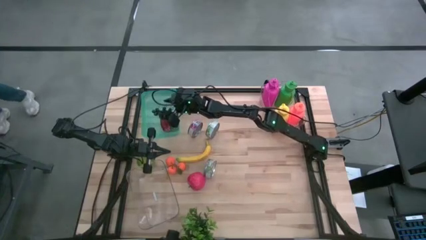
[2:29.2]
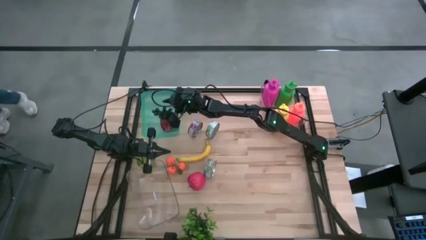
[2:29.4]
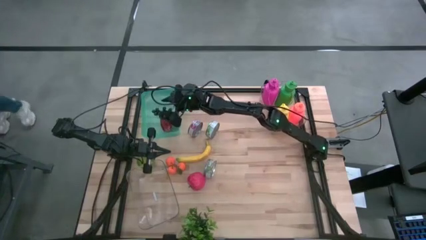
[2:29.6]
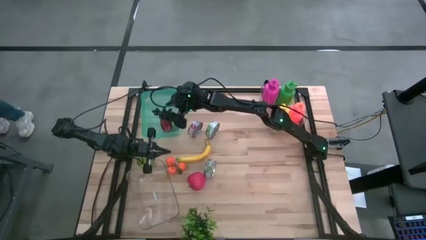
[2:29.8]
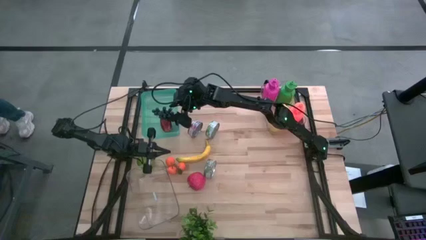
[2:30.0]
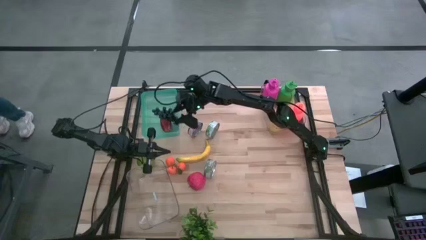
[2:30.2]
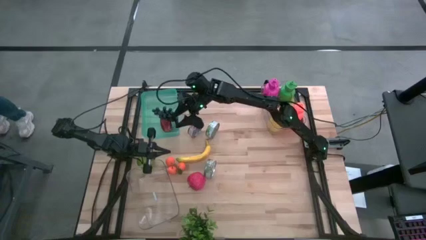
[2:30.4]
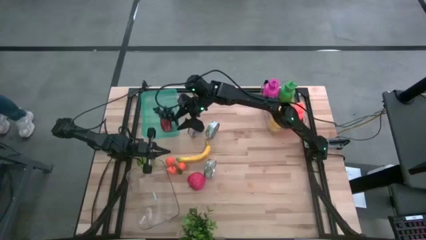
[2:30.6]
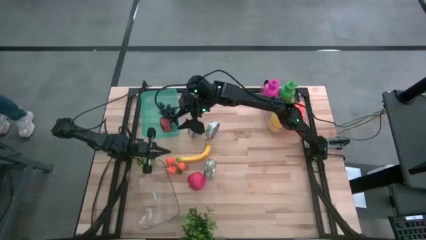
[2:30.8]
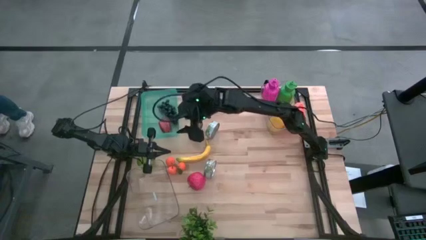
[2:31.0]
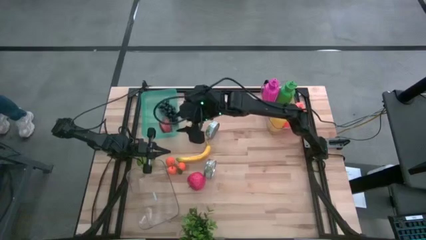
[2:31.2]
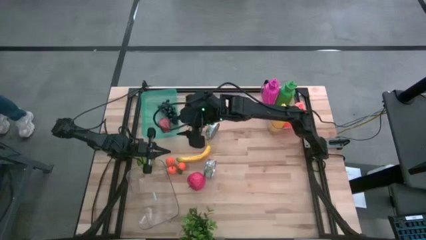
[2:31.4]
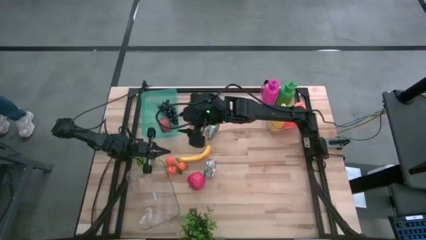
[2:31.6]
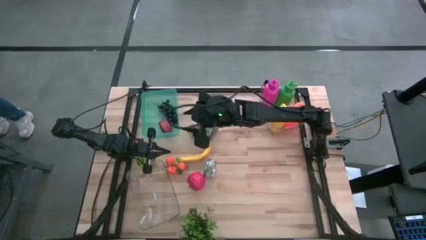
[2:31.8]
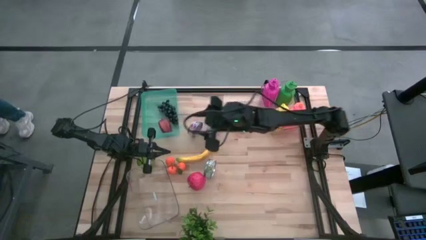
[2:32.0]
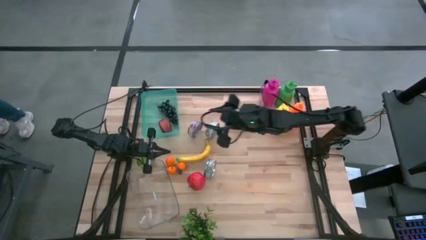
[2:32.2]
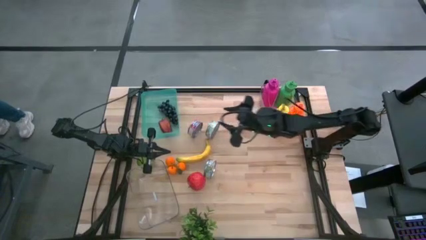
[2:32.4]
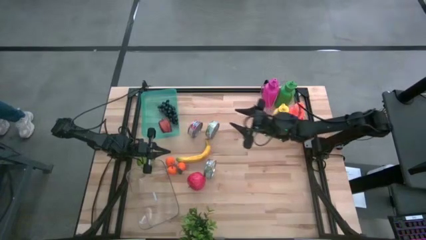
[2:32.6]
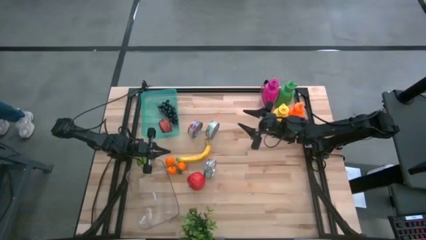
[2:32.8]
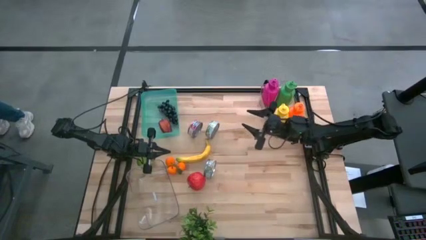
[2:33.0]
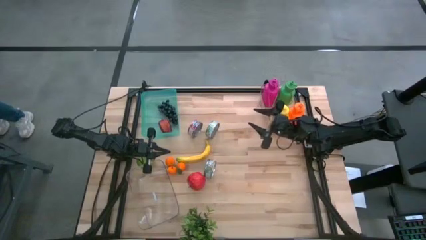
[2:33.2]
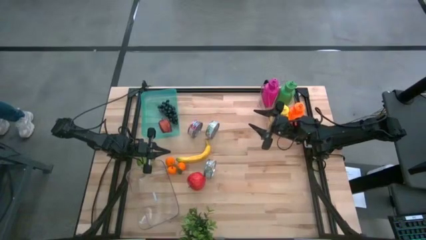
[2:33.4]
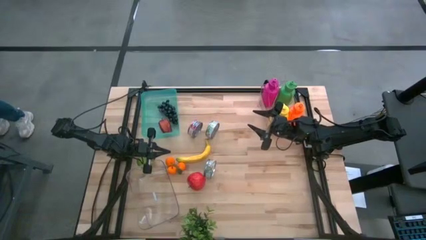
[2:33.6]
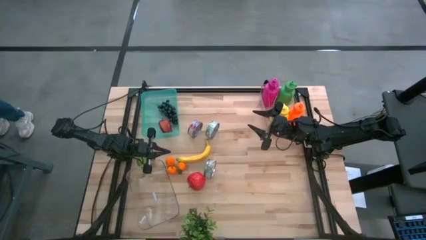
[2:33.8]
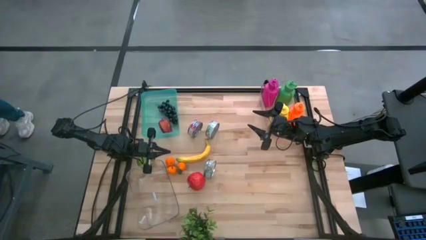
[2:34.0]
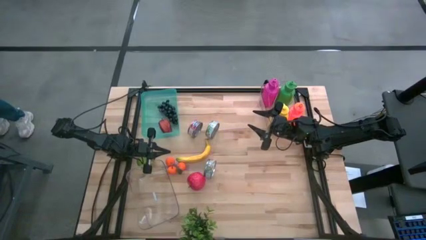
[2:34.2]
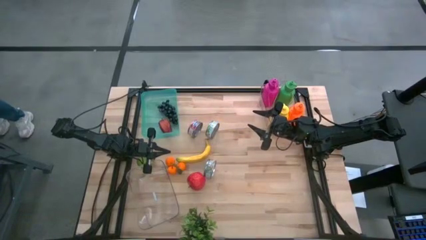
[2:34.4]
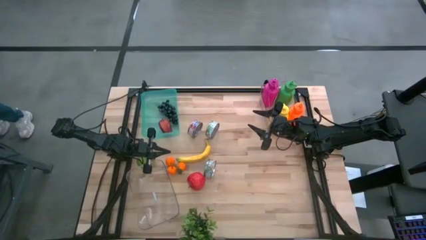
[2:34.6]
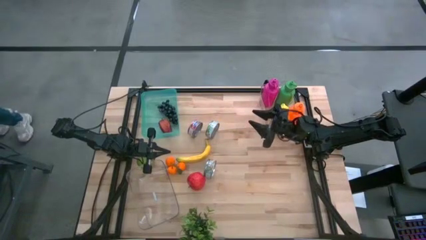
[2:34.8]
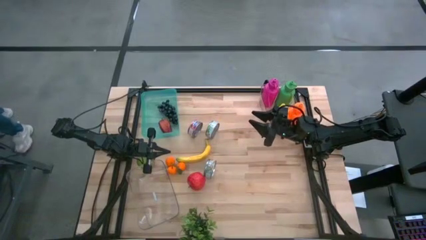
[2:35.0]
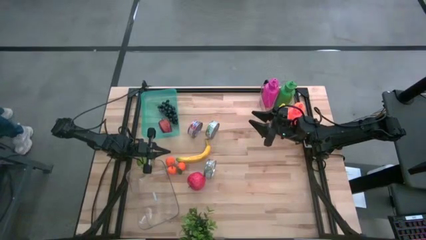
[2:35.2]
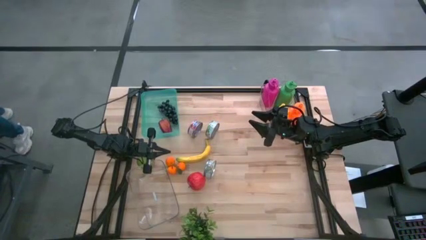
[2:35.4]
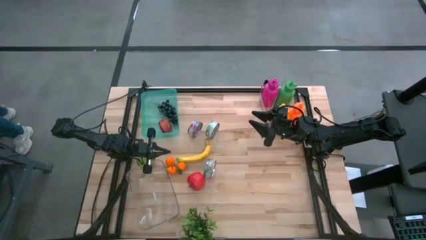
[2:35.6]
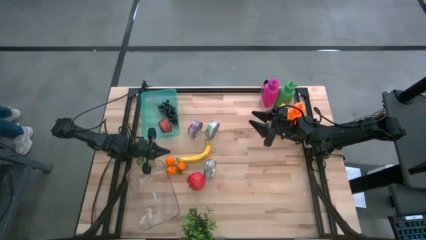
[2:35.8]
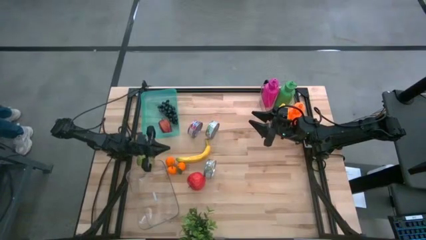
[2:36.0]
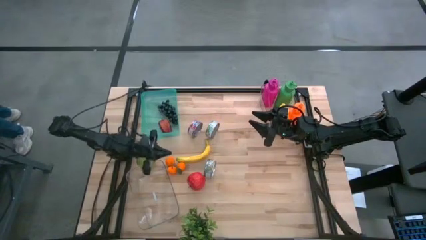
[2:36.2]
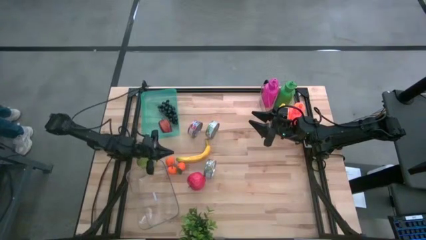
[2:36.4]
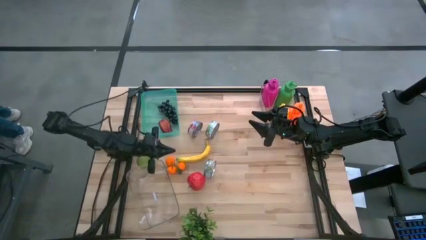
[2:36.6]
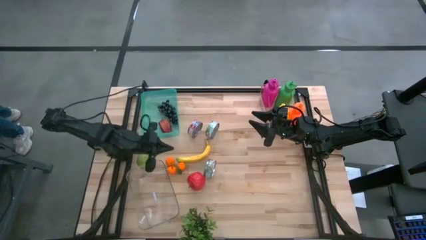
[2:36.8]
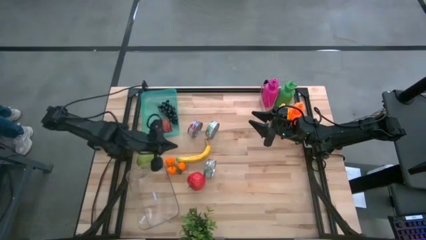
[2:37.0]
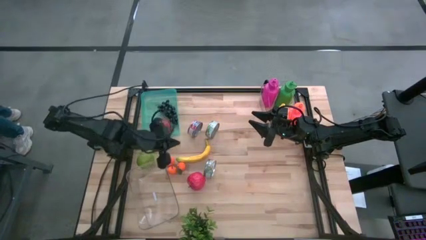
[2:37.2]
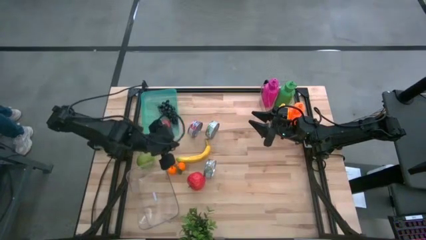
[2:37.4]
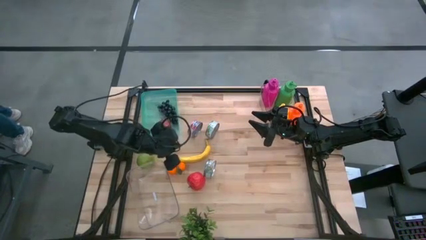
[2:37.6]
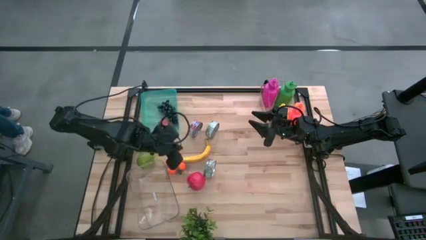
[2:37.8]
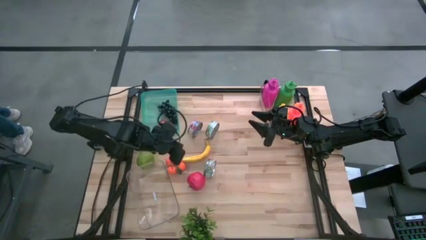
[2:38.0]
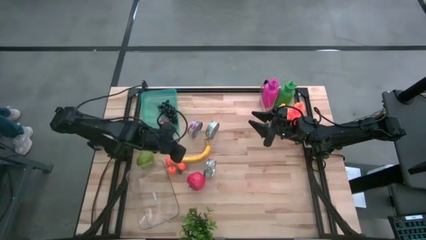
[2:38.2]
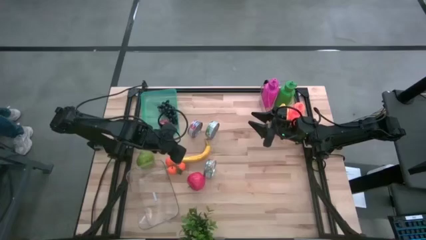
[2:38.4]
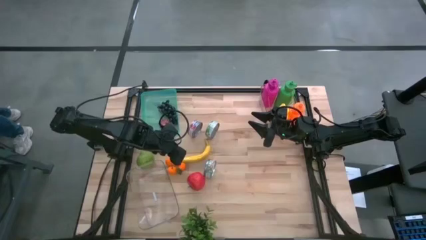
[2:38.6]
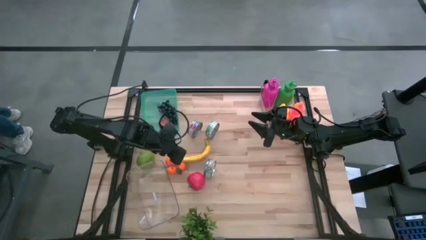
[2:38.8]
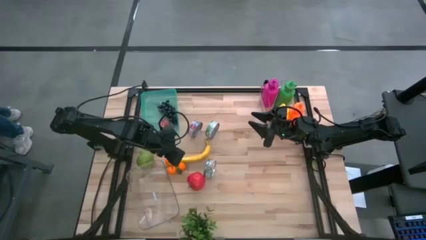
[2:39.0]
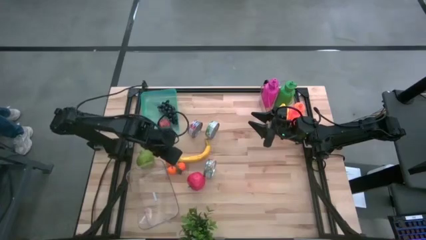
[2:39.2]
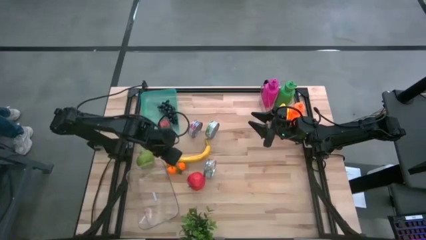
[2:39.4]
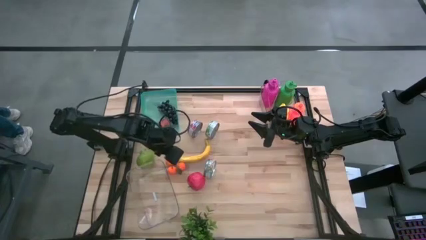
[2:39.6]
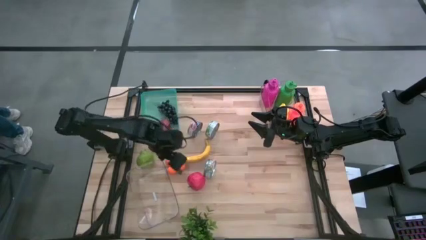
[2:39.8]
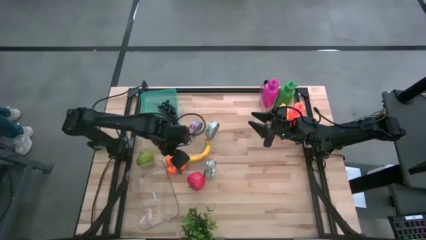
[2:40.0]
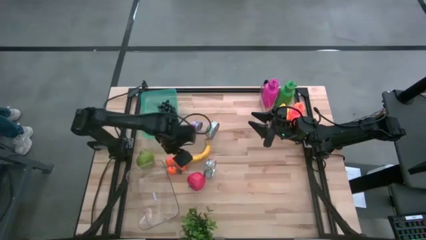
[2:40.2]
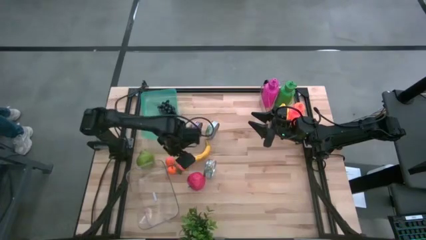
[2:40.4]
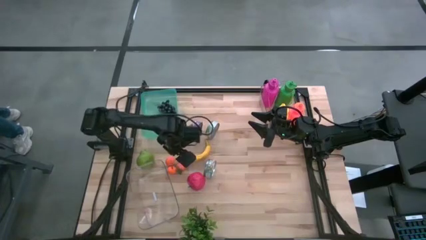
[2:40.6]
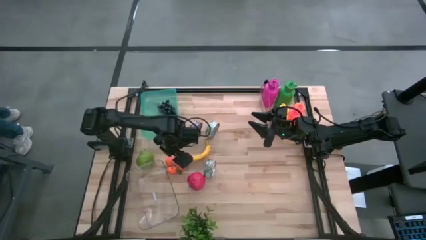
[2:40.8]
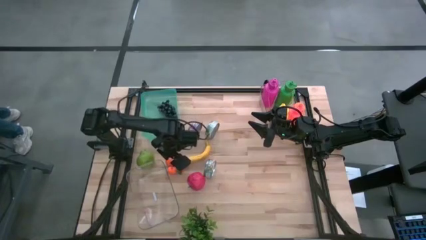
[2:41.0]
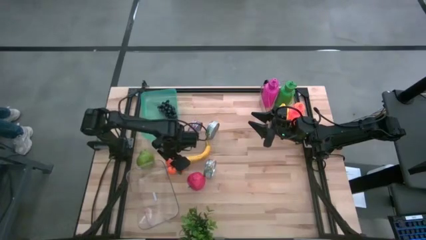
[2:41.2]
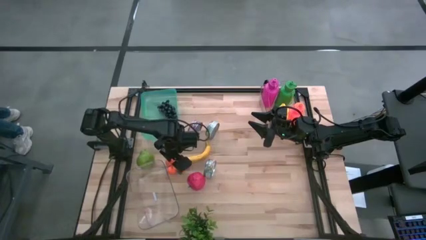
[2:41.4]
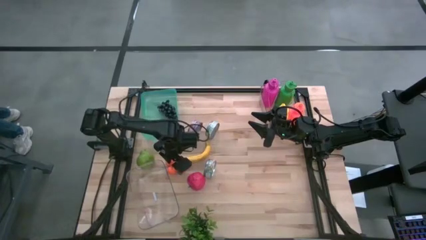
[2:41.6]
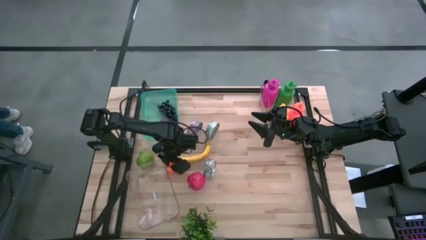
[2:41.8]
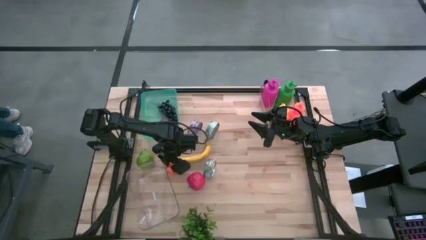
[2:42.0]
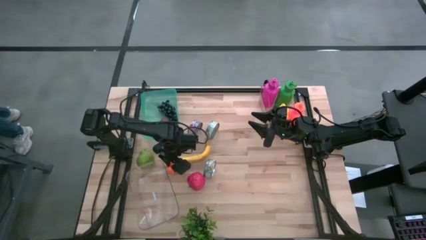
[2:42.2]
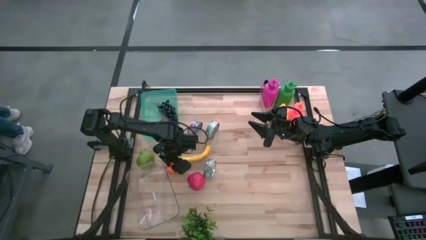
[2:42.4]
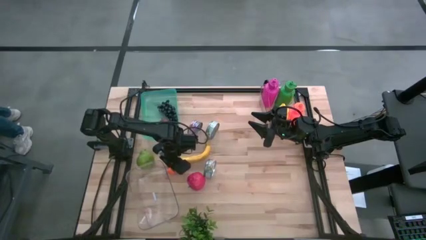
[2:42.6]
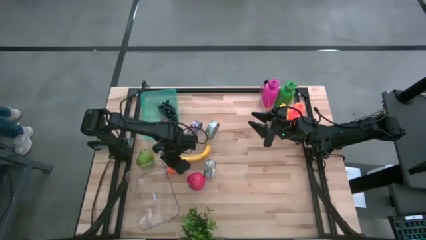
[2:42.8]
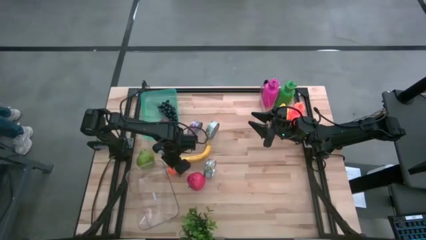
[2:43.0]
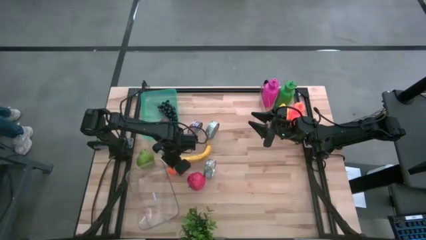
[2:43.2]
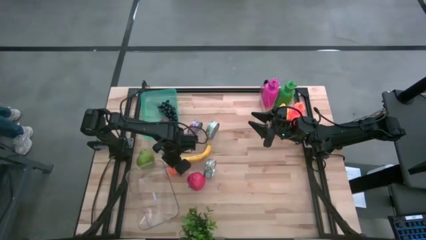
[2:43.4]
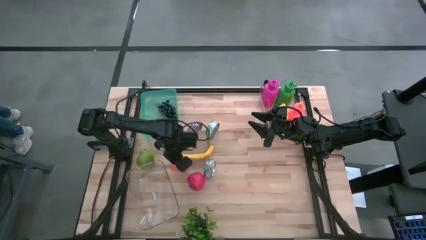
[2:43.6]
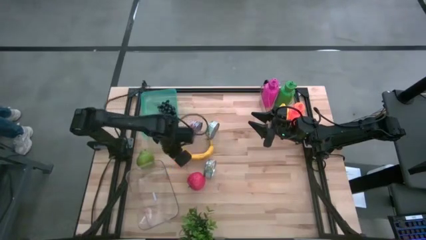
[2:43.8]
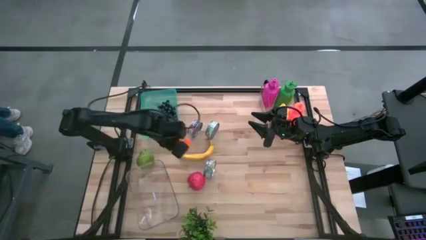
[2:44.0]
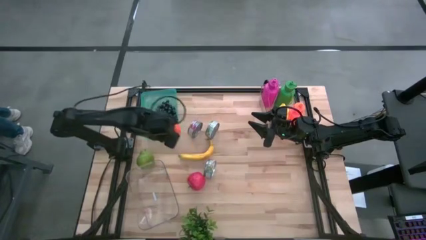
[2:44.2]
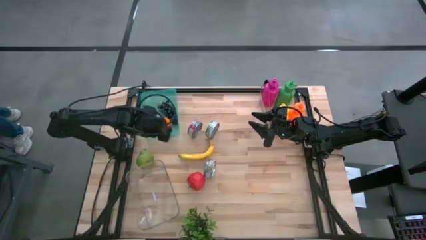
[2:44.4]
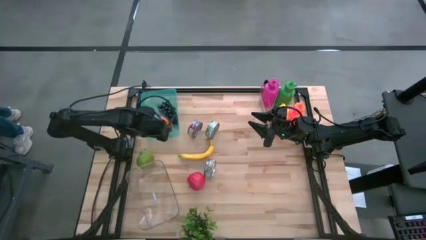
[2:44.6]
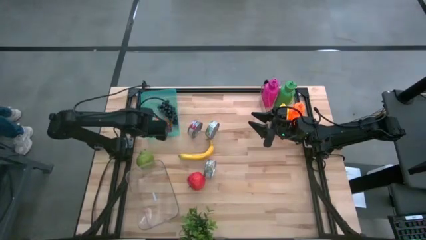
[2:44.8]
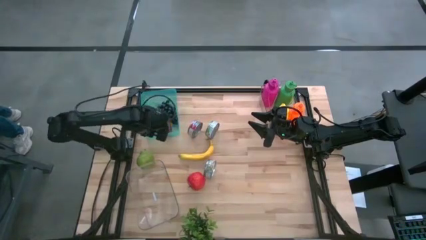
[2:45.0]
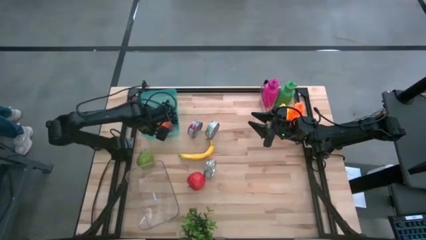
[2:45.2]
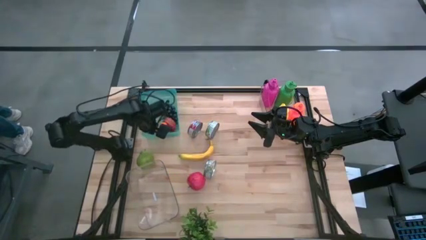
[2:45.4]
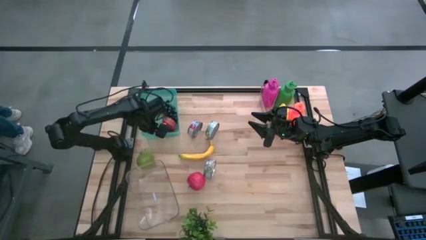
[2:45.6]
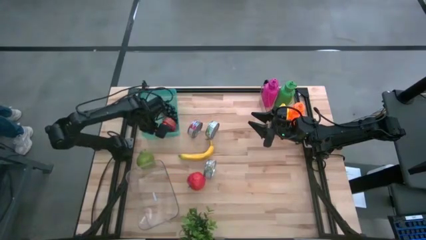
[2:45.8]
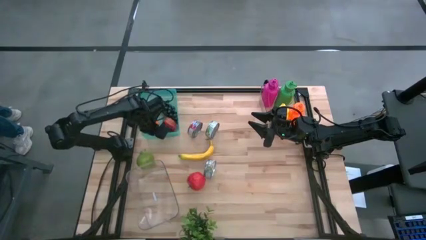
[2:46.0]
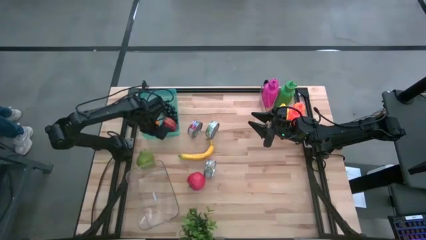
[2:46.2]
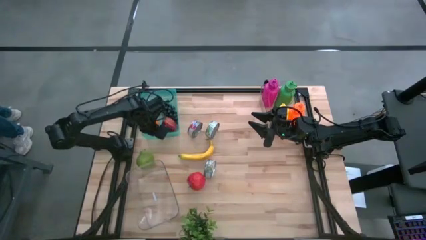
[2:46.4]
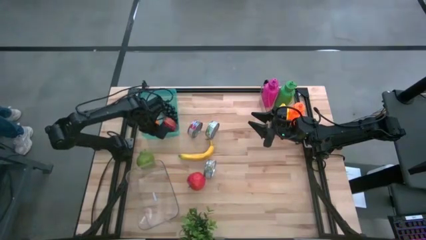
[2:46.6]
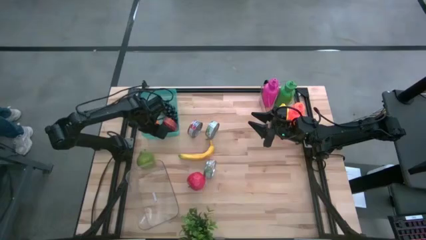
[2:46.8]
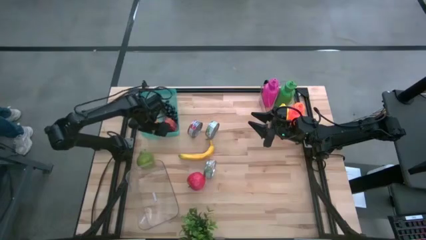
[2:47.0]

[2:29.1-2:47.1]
Task: Pick & Place Food Item
Put the oranges into the green bin
